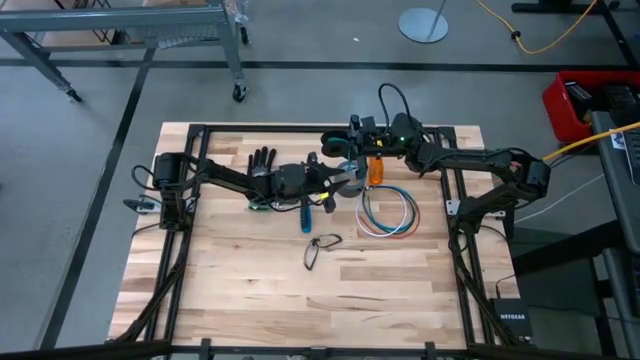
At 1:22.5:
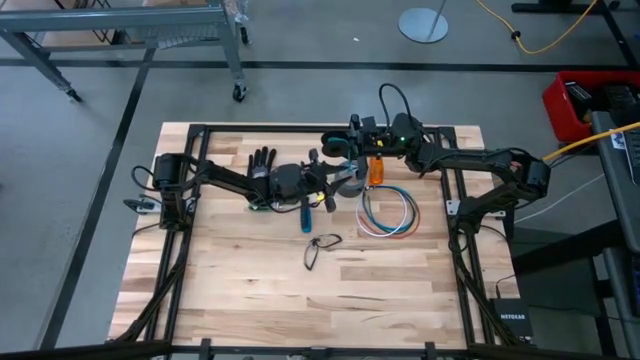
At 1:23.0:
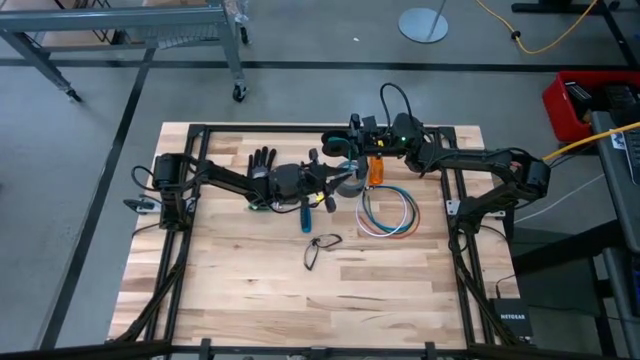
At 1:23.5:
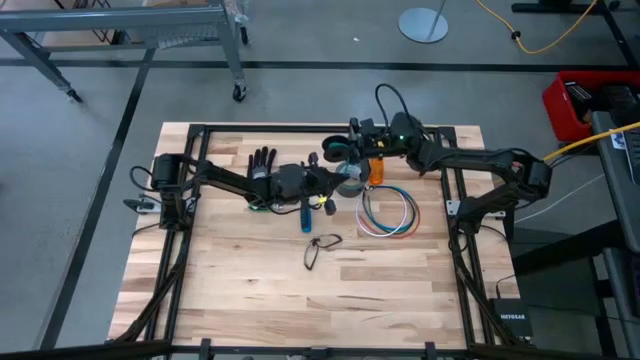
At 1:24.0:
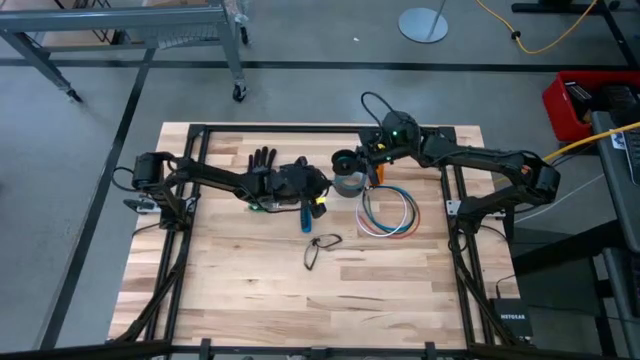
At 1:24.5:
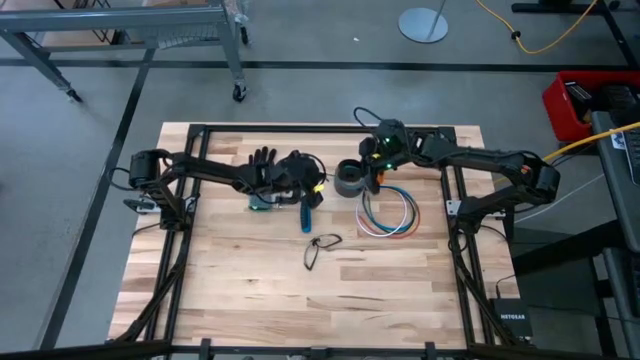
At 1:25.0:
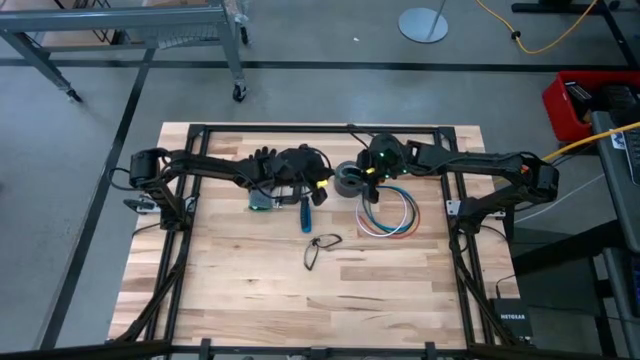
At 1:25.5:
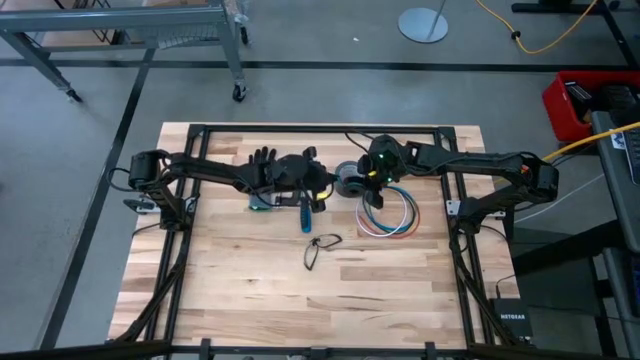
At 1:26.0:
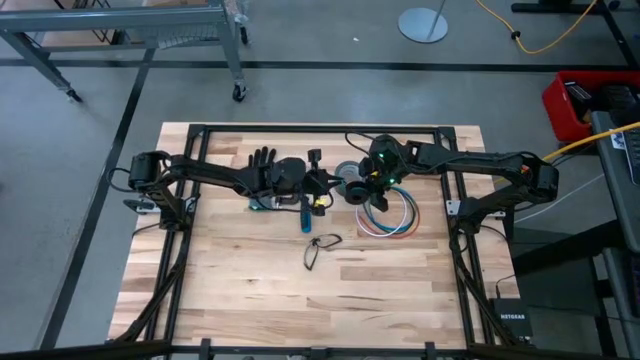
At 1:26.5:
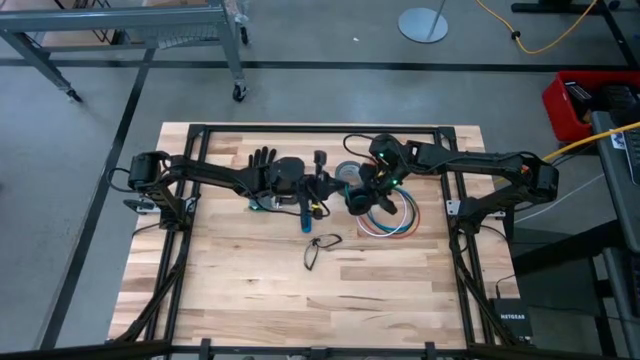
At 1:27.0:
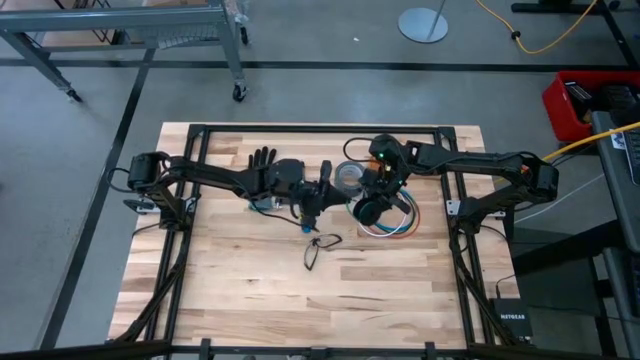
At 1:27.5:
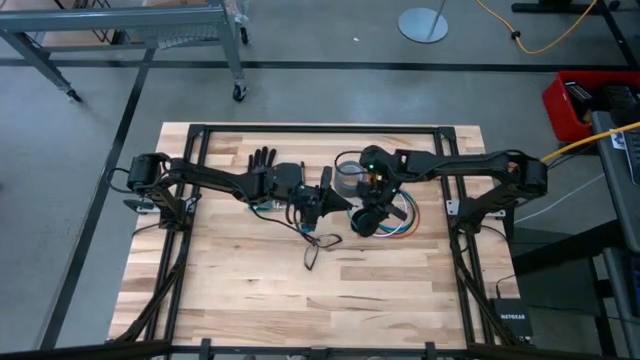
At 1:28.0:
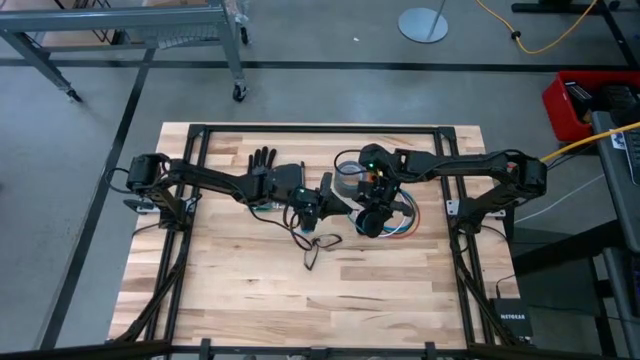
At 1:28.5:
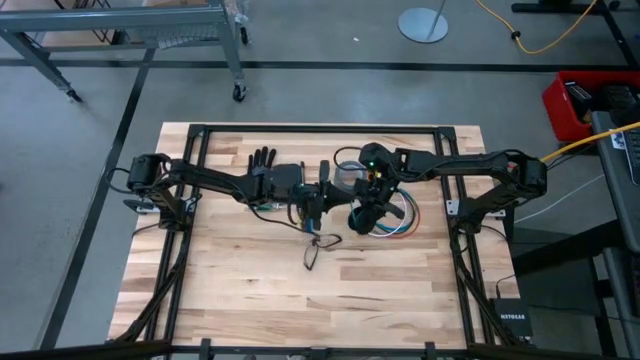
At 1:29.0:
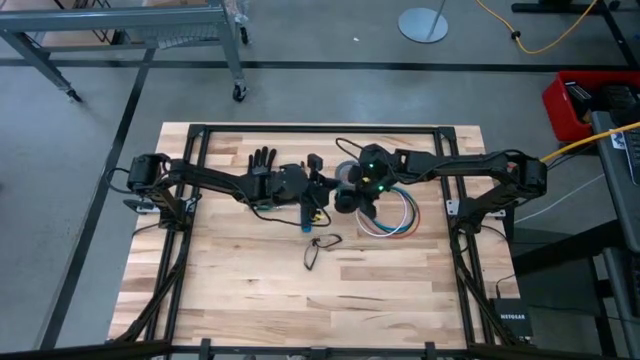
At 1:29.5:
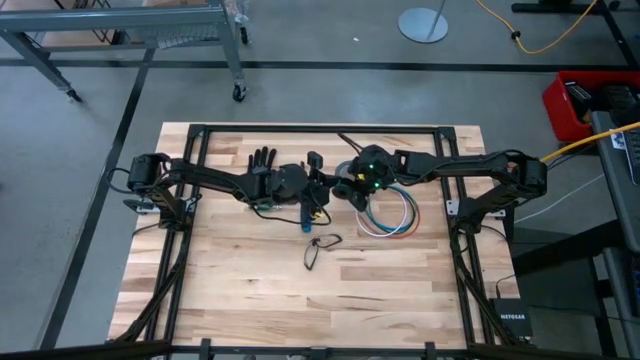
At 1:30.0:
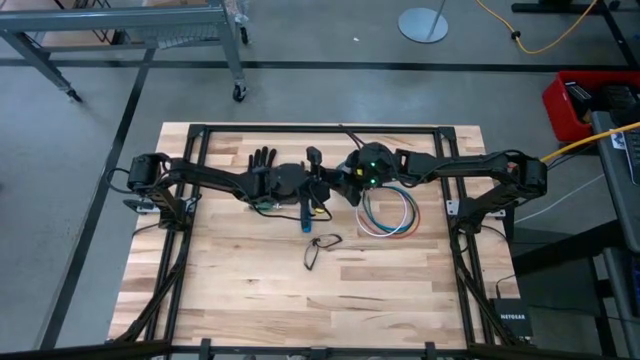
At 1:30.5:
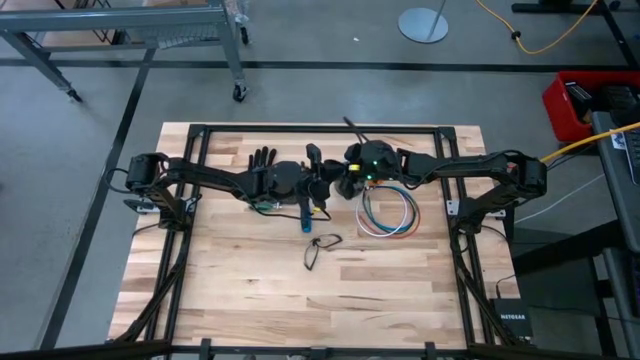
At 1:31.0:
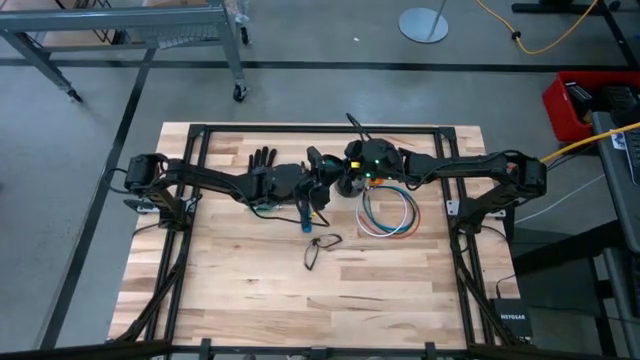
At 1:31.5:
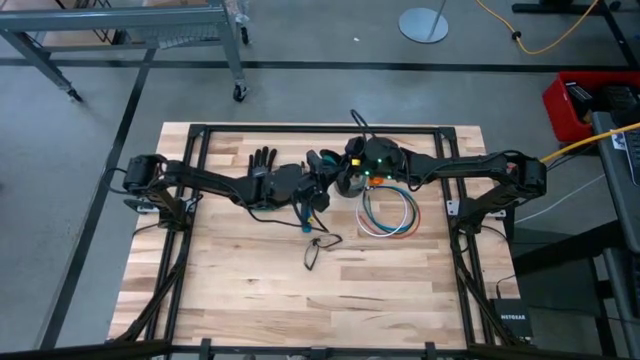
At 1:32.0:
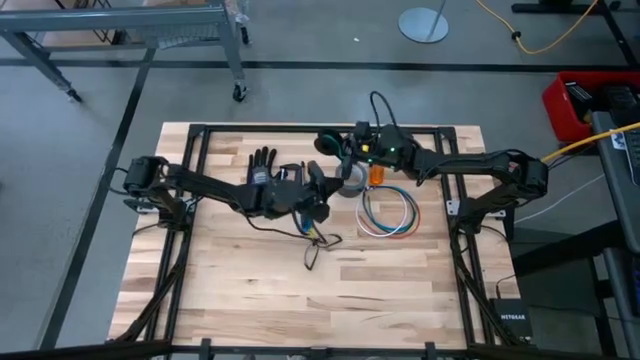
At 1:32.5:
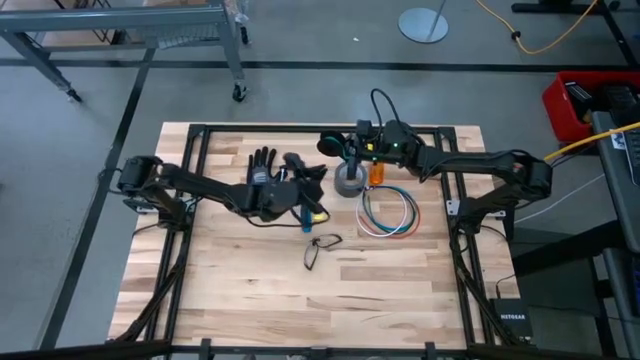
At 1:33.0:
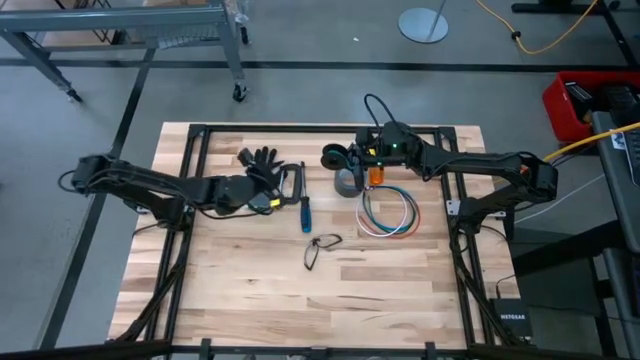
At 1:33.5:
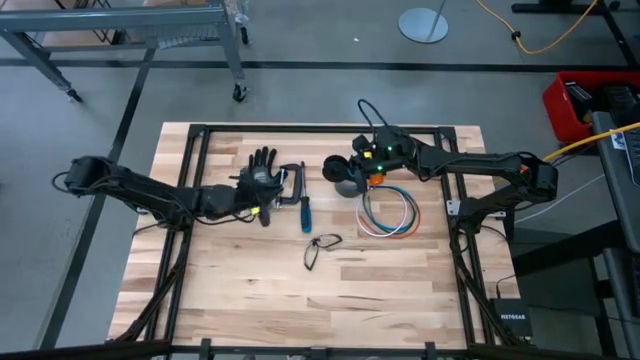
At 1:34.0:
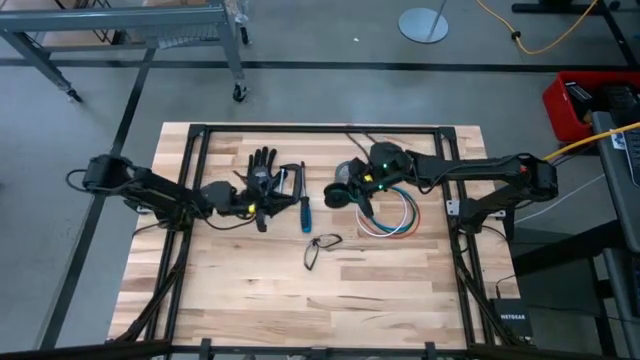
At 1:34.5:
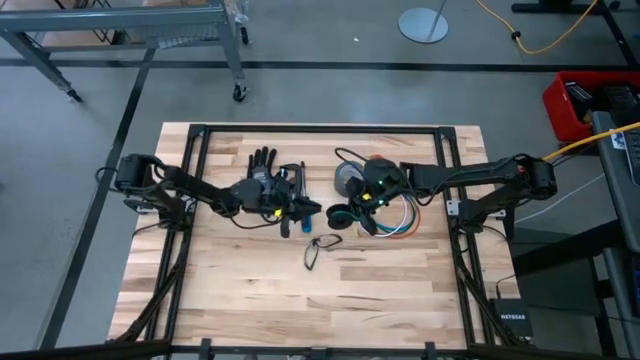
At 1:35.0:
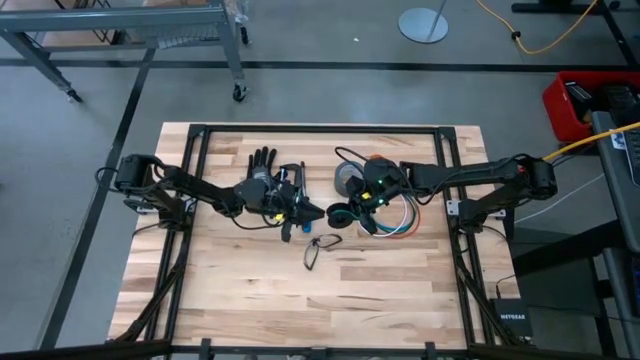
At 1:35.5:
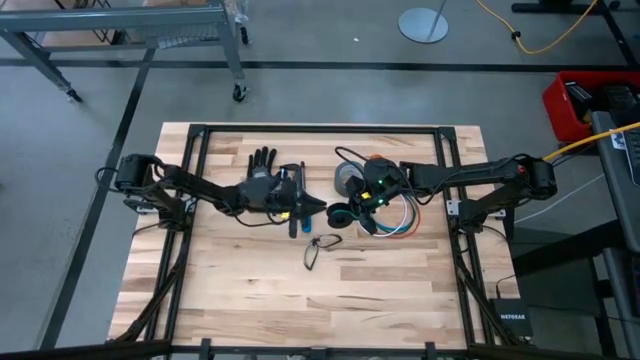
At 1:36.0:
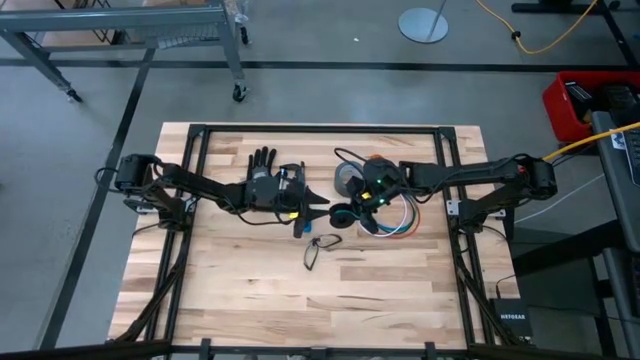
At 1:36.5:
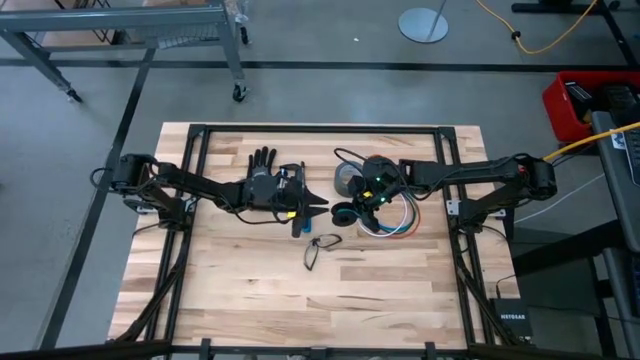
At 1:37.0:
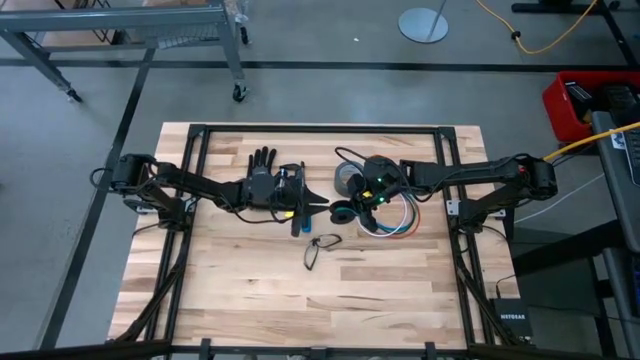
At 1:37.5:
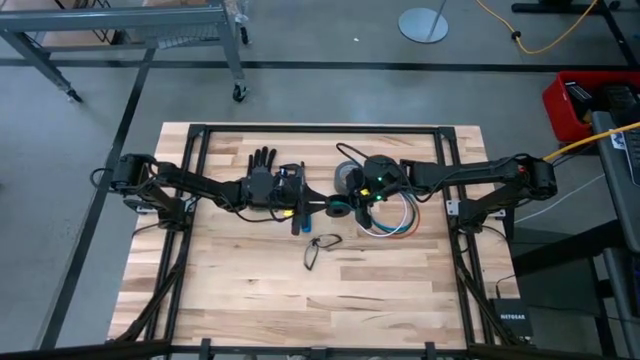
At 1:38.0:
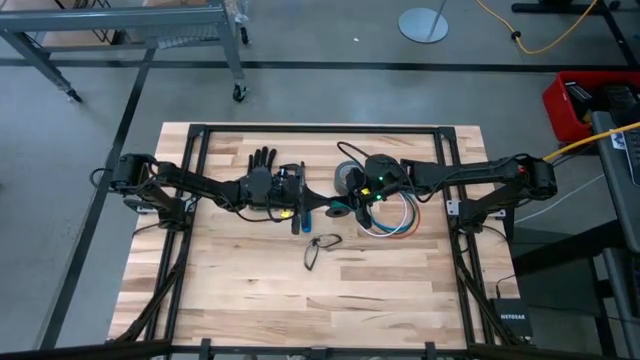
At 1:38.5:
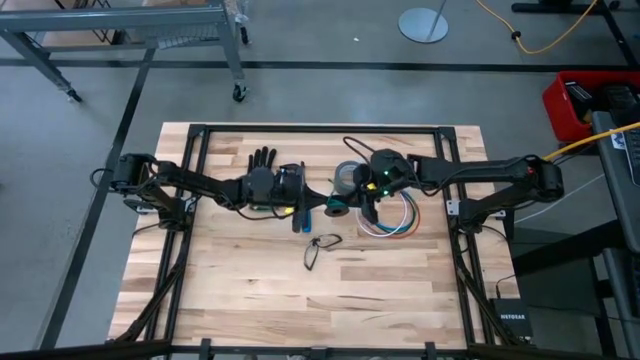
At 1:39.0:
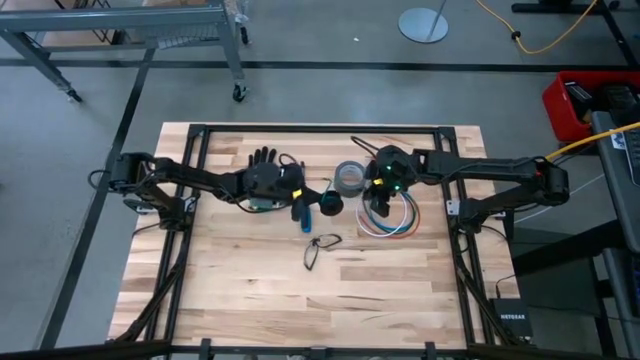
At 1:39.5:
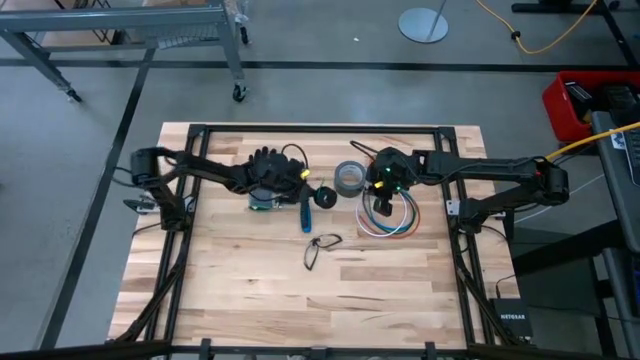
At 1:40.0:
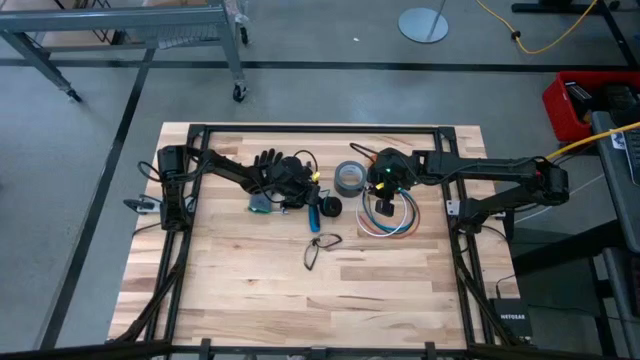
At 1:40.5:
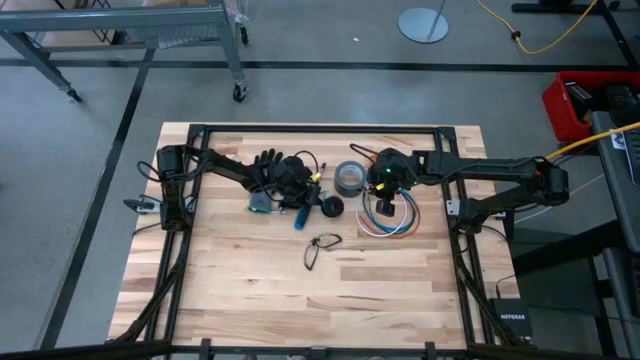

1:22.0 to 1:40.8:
Task: Coil cords
Coil the green wire onto the spool

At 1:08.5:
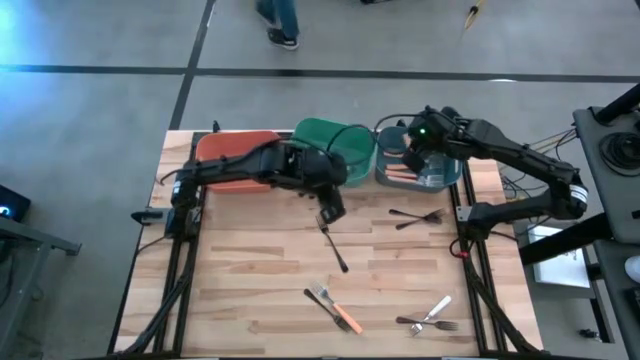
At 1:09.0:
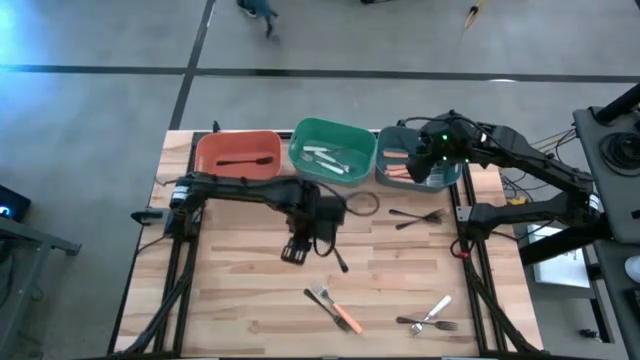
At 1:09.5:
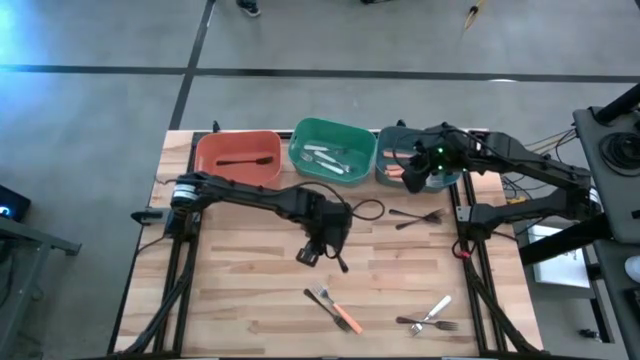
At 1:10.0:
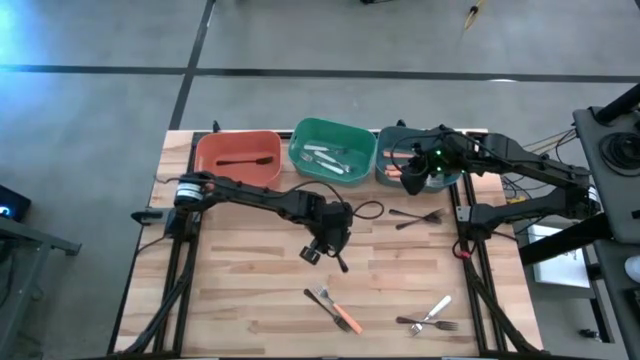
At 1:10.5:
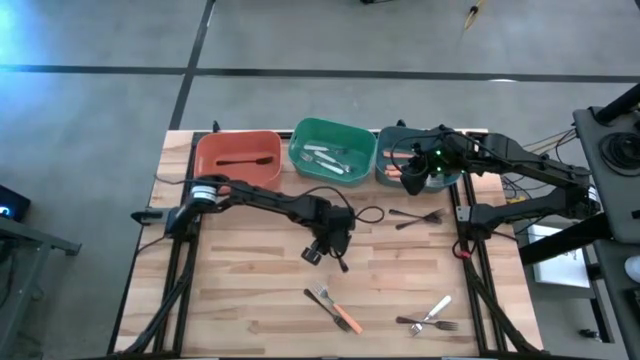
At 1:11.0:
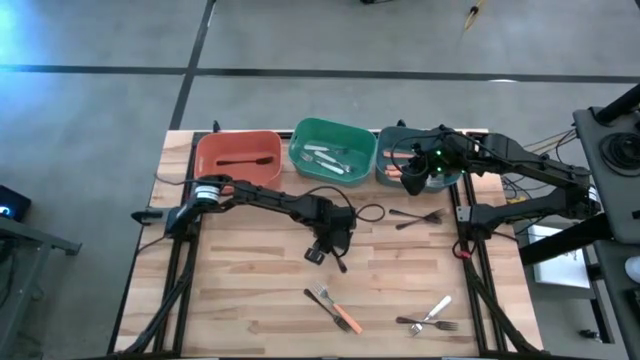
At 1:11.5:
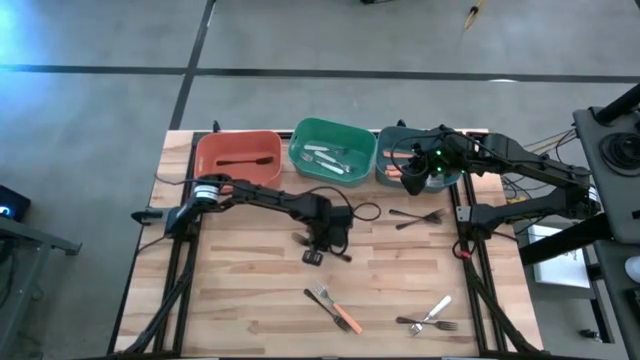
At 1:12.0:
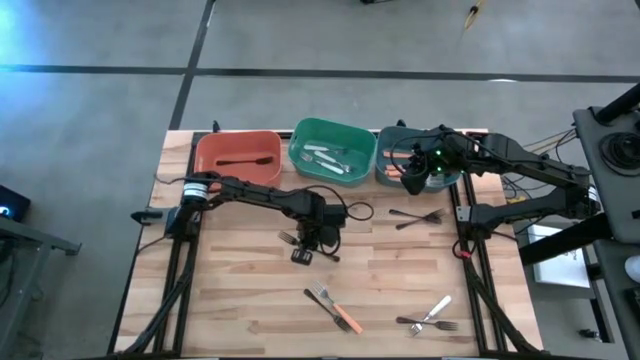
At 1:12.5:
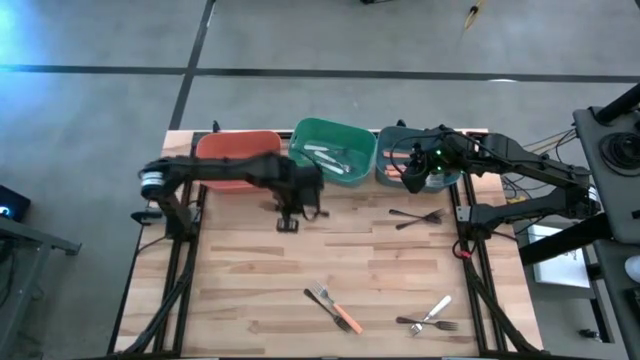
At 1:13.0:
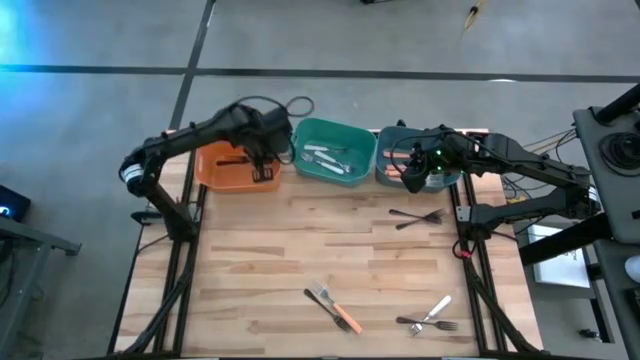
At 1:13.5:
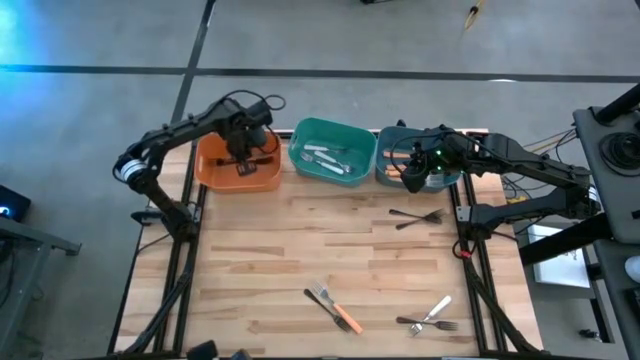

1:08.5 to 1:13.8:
Task: Sort silverware by color (type)
Put the black fork into the orange bin
